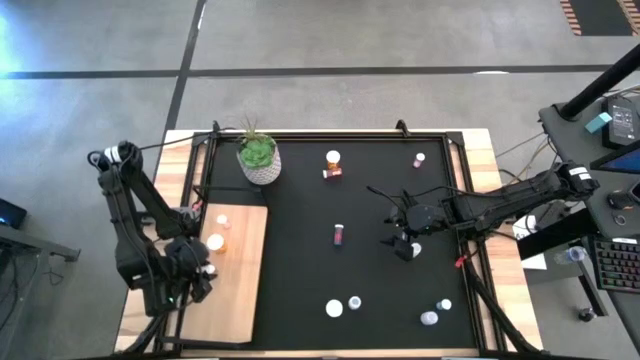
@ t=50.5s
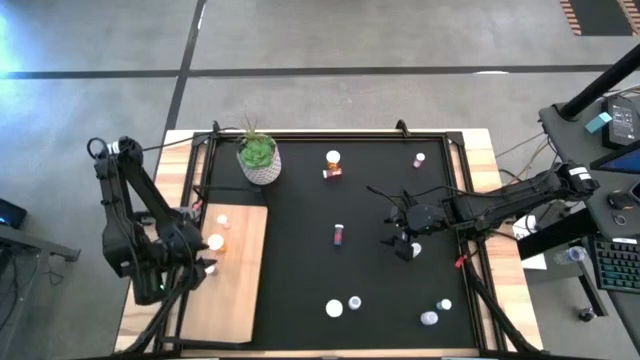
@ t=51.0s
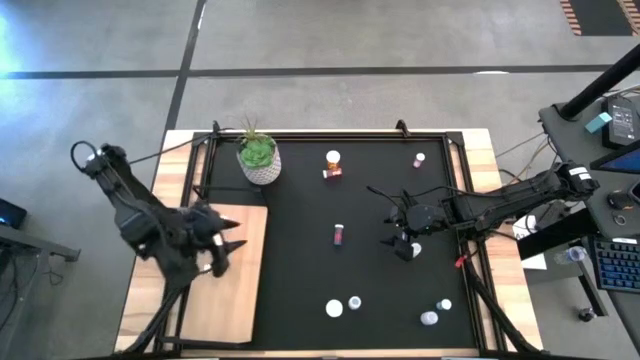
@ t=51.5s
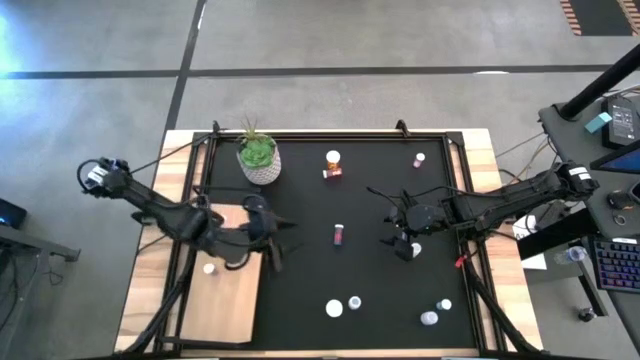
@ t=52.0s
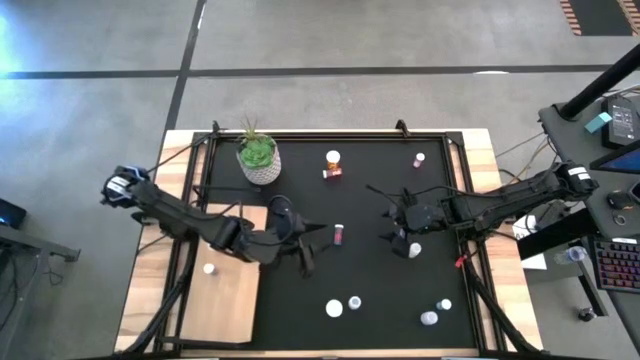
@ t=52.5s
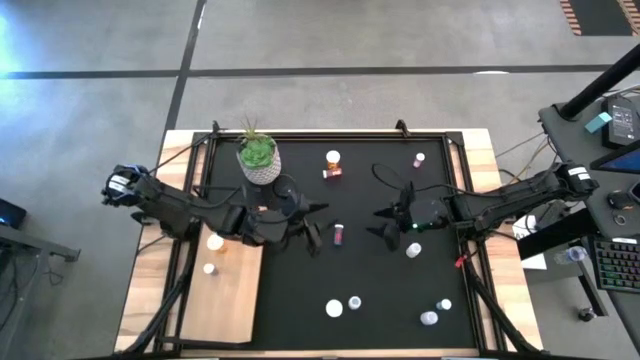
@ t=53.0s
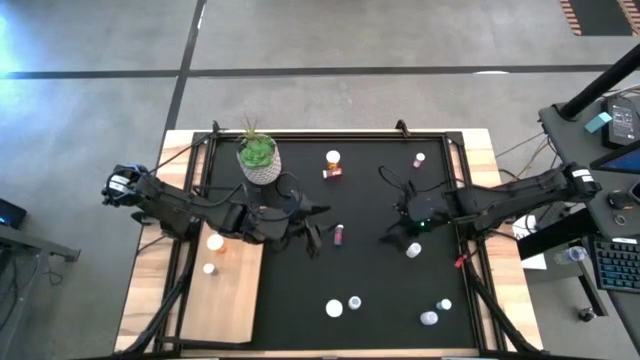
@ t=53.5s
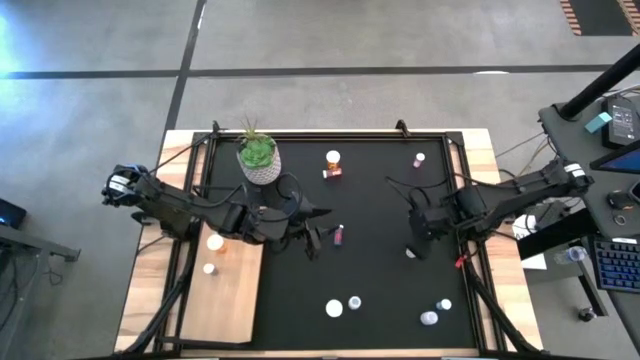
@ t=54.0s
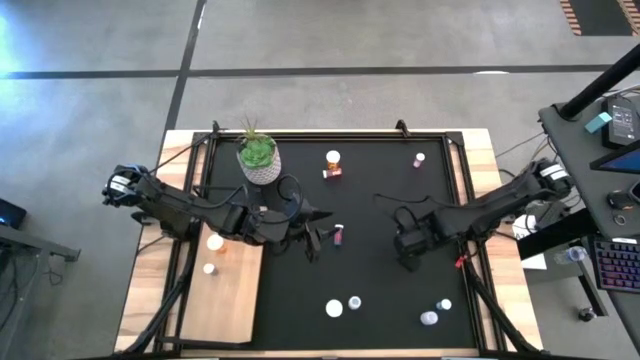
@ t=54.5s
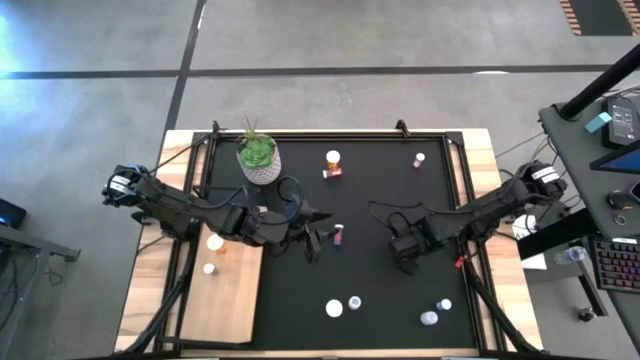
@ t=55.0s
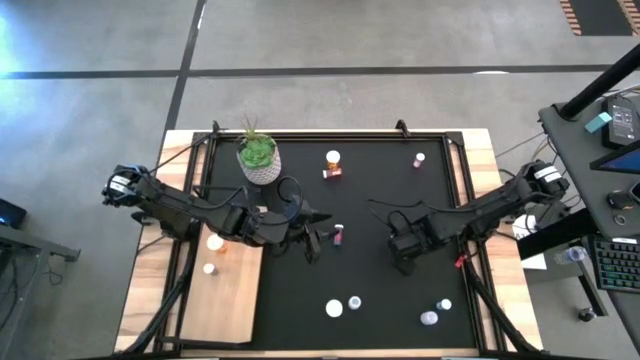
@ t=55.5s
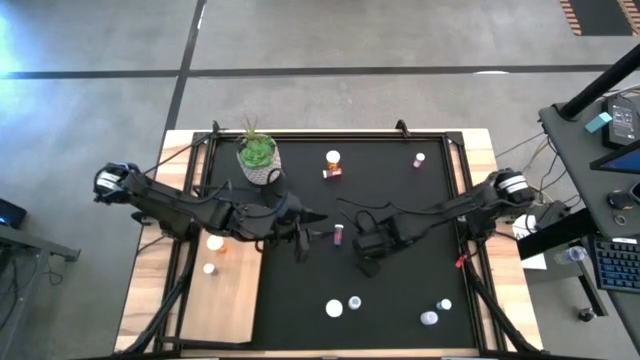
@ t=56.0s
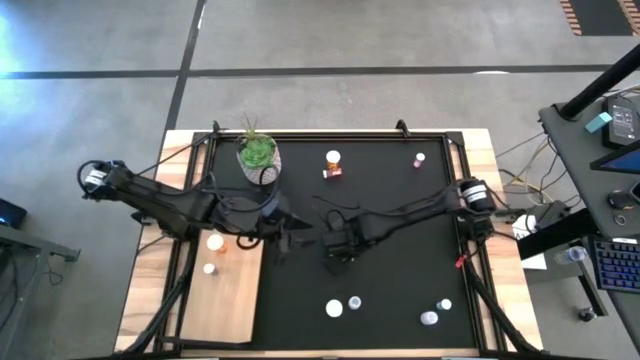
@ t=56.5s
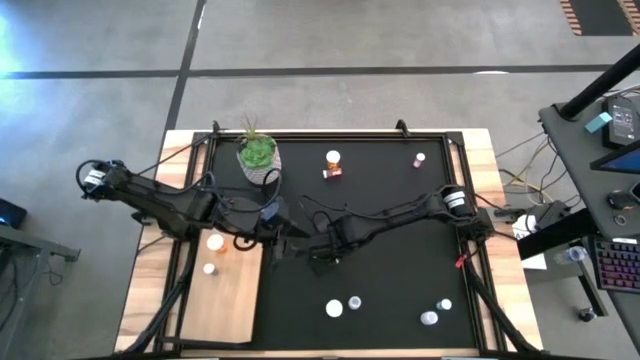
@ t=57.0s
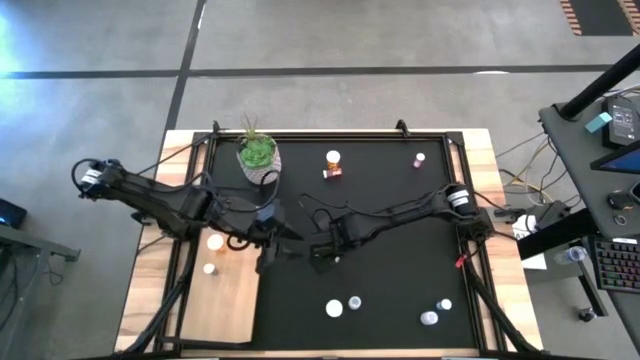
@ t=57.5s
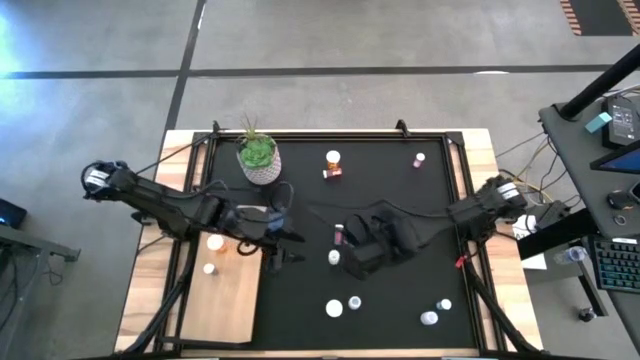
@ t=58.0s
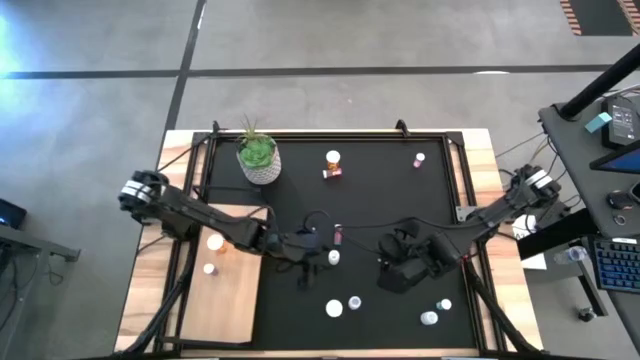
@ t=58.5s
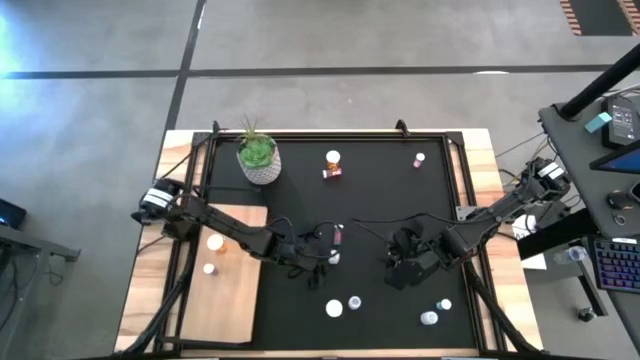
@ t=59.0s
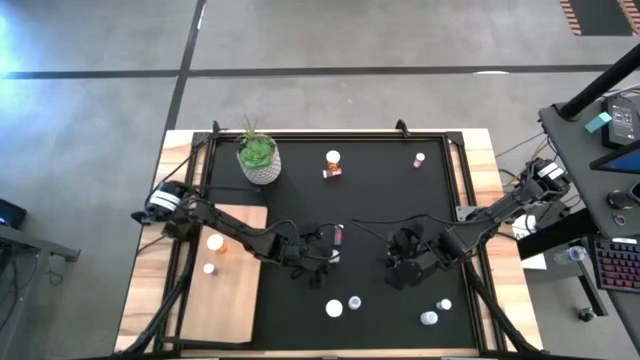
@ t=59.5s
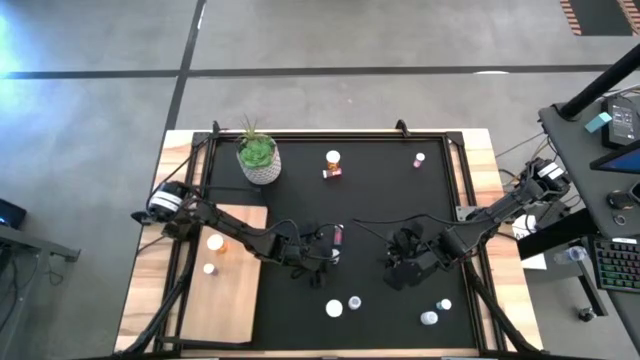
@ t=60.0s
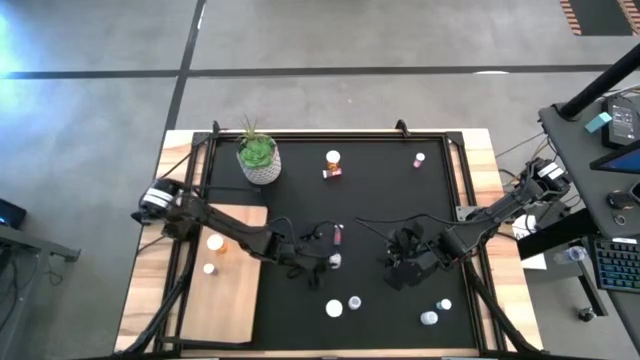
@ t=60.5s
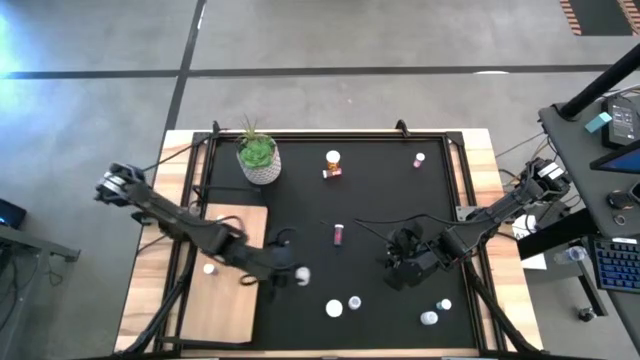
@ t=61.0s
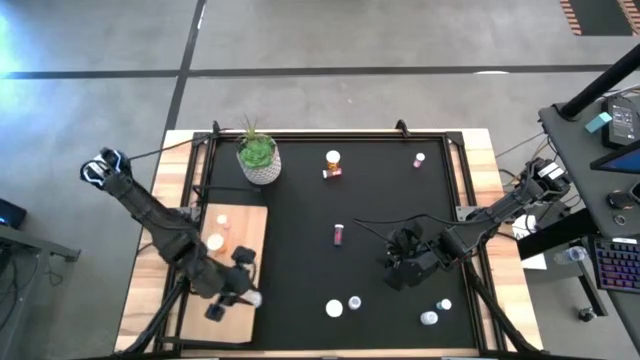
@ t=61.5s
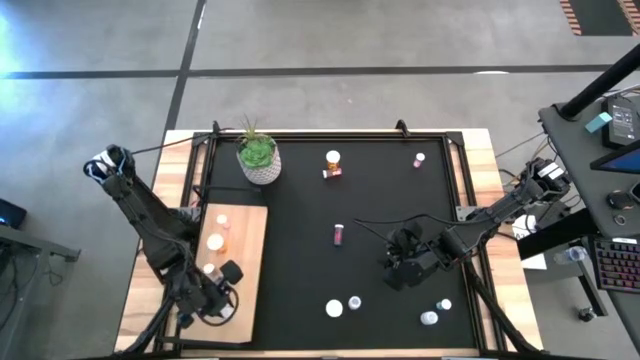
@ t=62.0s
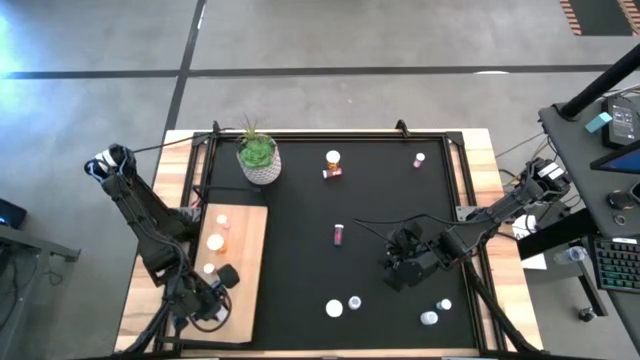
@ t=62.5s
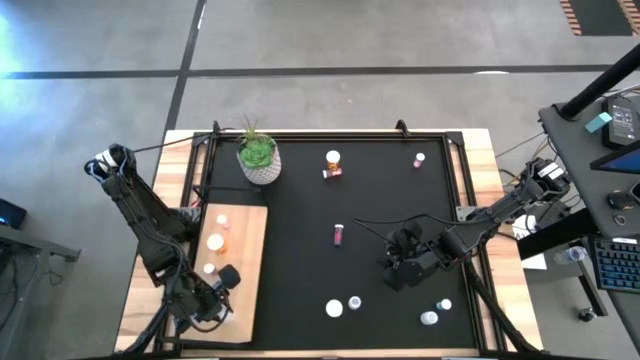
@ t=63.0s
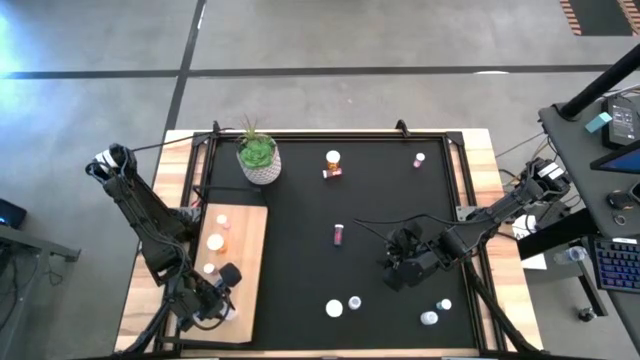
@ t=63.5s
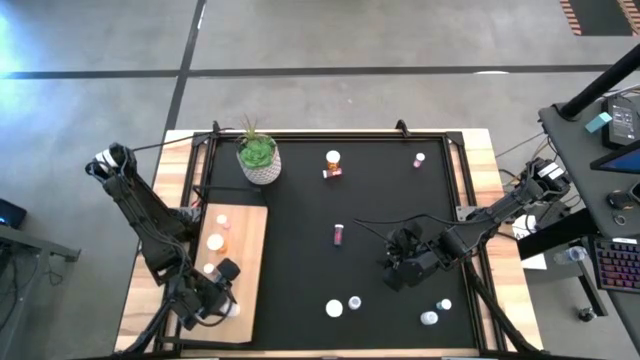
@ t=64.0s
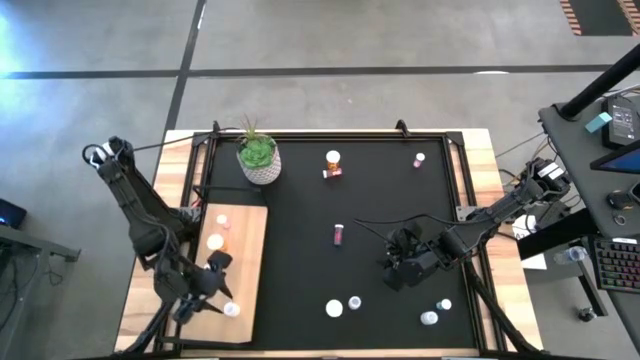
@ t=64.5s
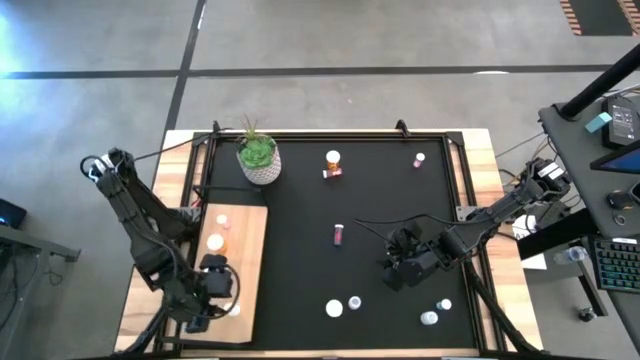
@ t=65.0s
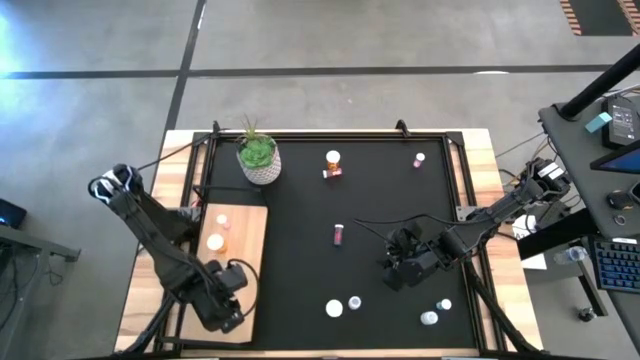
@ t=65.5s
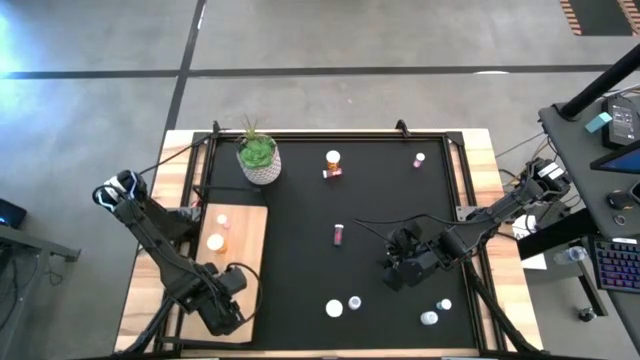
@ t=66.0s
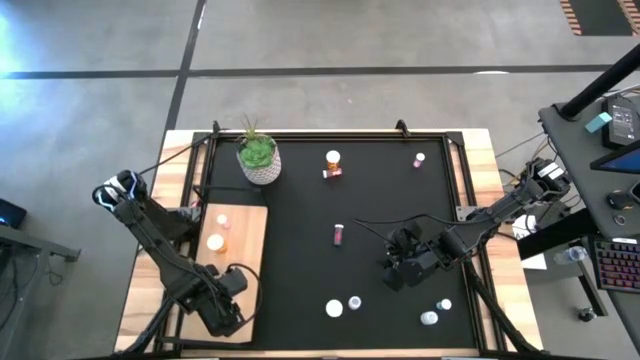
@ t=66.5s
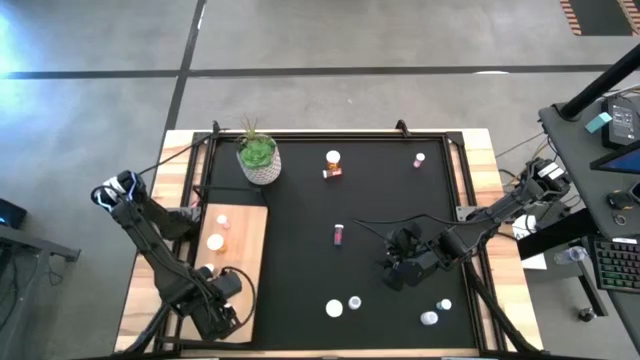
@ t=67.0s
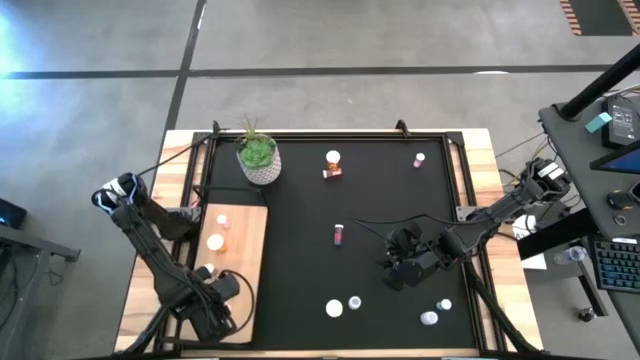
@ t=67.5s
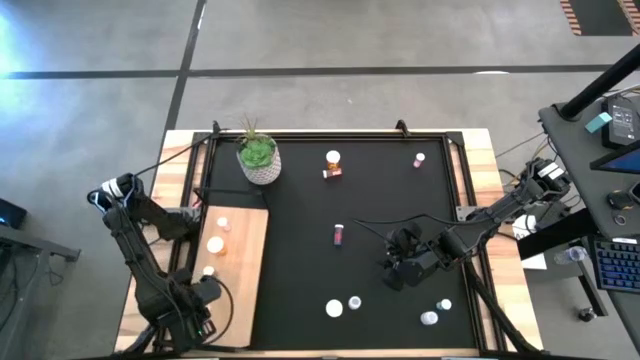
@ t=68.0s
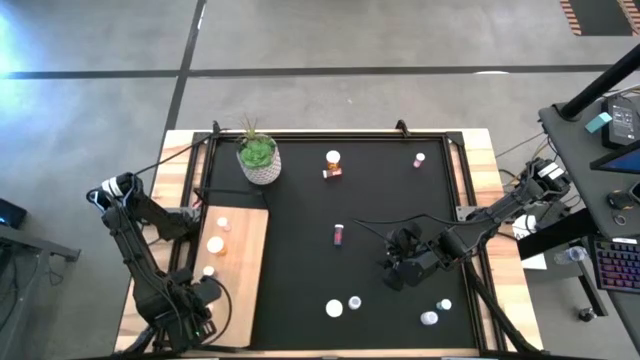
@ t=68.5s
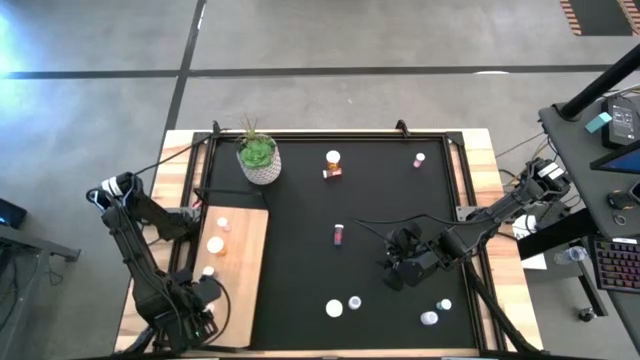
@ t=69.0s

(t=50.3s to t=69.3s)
Task: Pick and place medicine bottles onto shelf by color
Put the top white pill bottle on the shelf

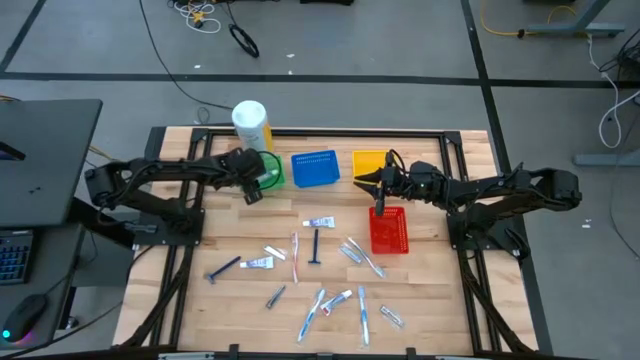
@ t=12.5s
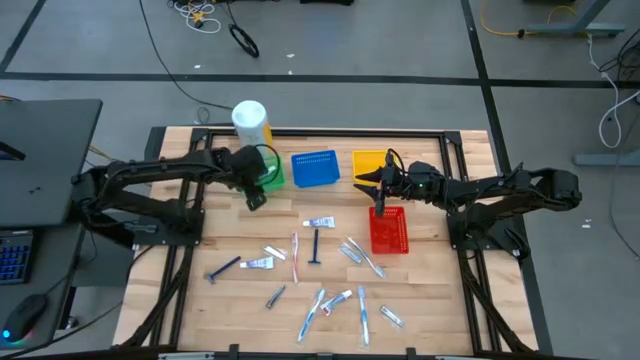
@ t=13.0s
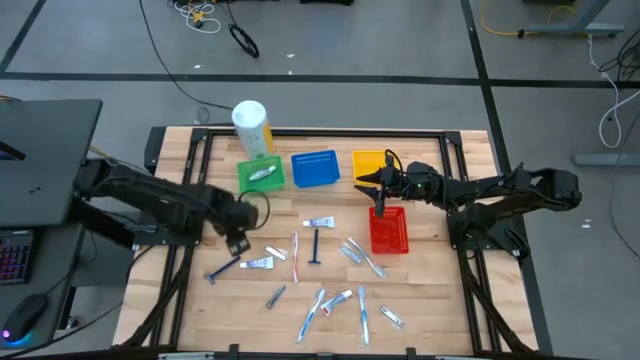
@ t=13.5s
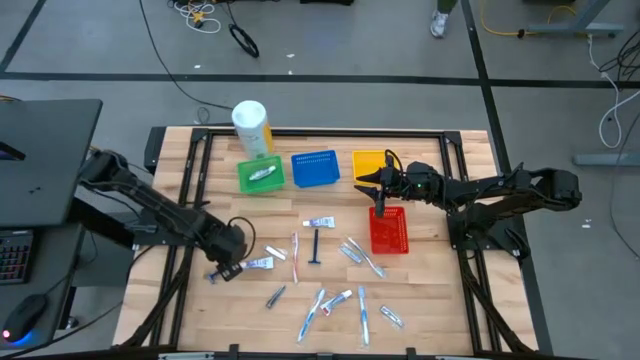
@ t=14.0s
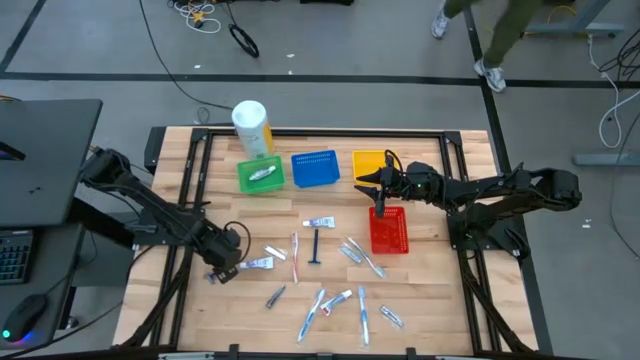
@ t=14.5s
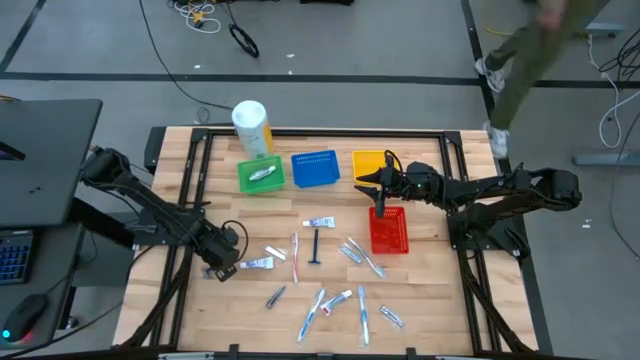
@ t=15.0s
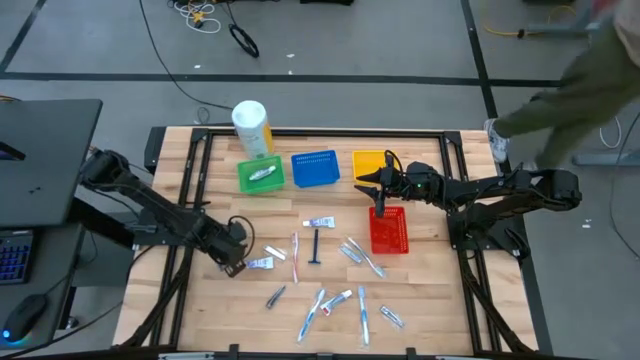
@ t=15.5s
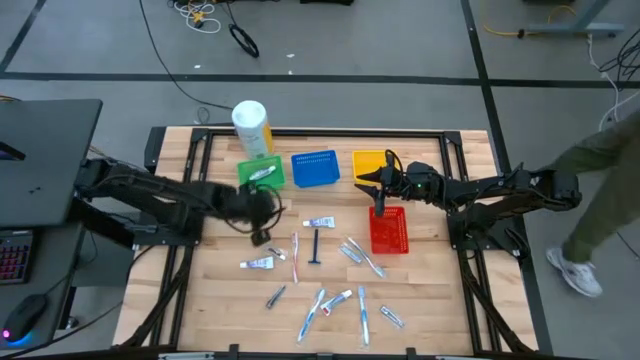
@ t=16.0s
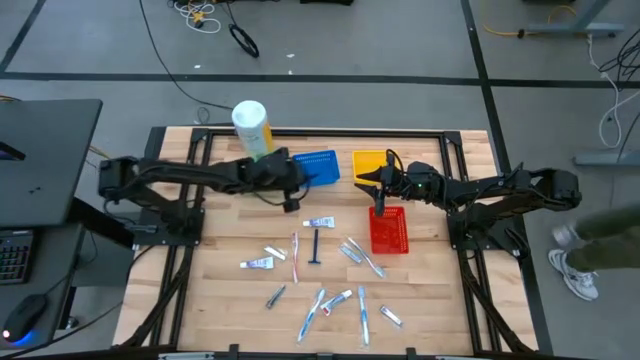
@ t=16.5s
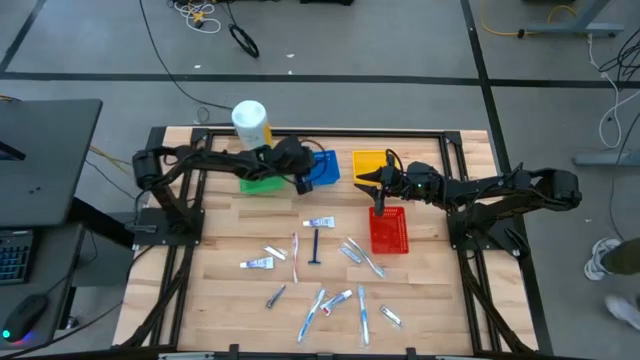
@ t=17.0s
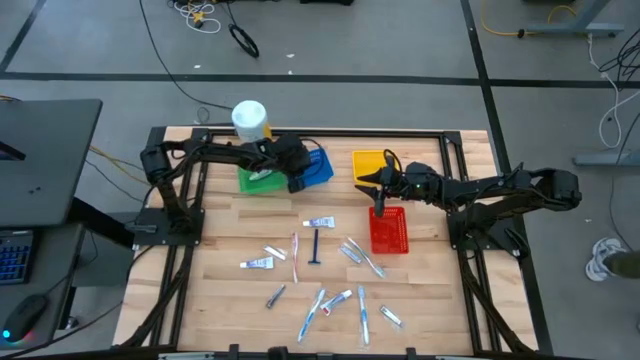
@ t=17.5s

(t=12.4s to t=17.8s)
Task: Pick & Place Travel size toiletries
Put the left blue razor into the blue bin
